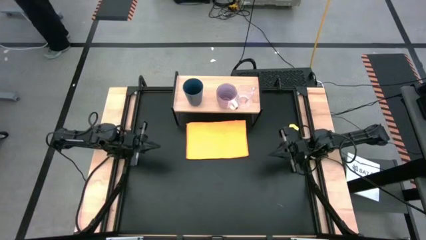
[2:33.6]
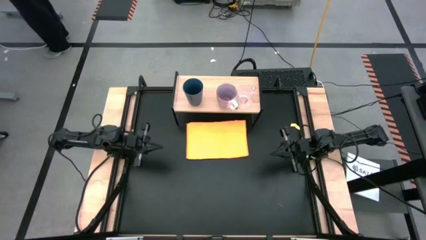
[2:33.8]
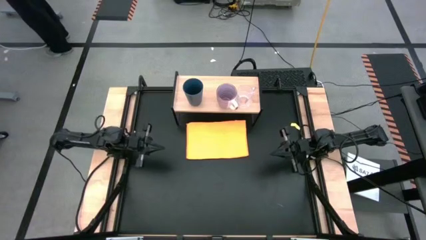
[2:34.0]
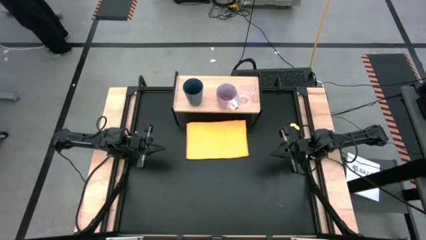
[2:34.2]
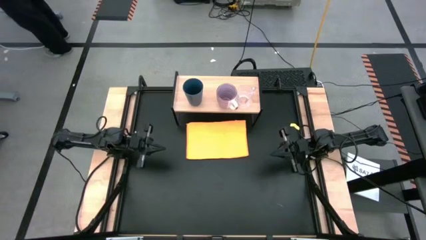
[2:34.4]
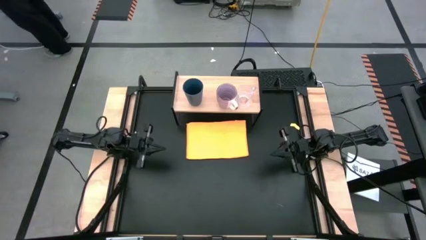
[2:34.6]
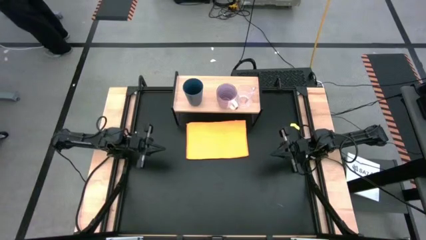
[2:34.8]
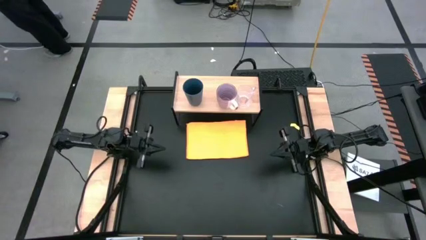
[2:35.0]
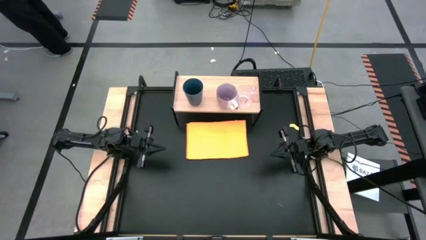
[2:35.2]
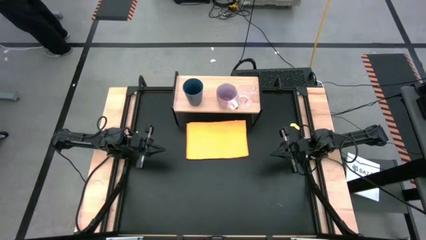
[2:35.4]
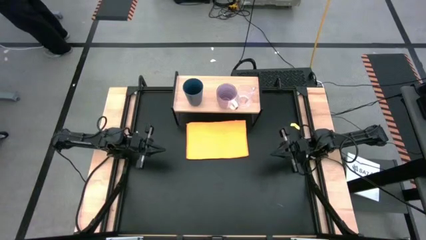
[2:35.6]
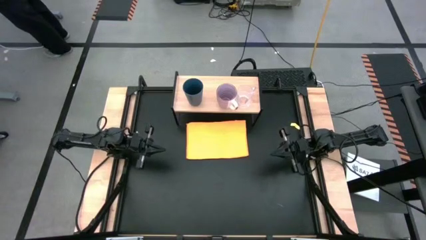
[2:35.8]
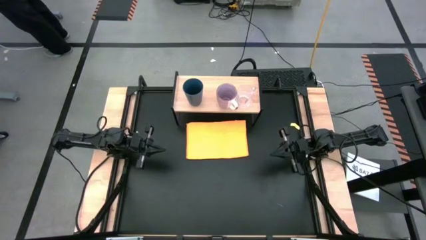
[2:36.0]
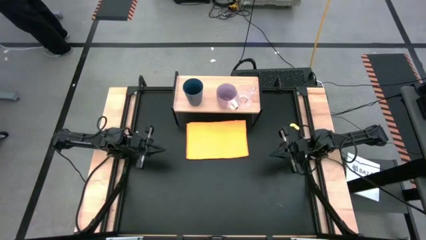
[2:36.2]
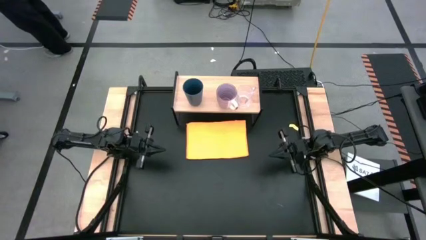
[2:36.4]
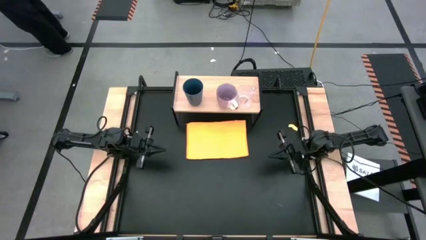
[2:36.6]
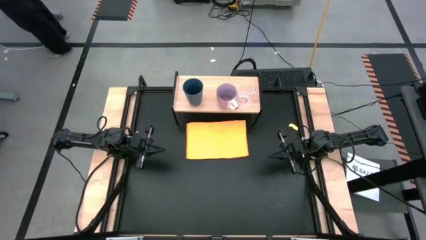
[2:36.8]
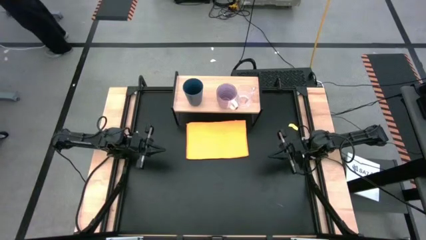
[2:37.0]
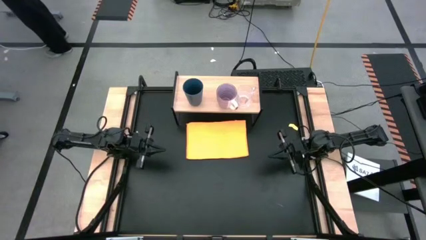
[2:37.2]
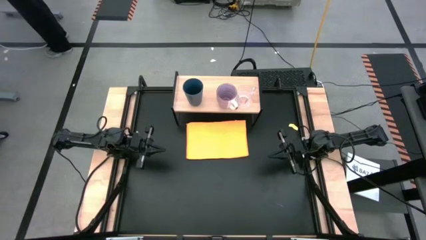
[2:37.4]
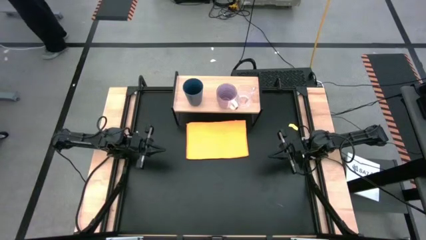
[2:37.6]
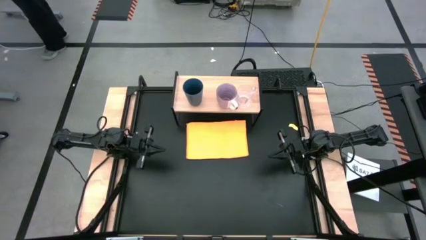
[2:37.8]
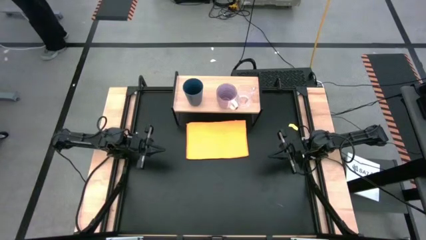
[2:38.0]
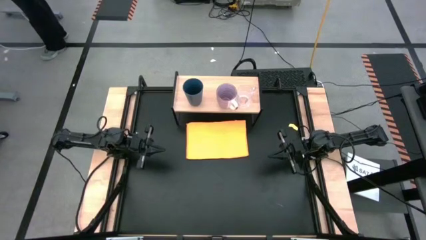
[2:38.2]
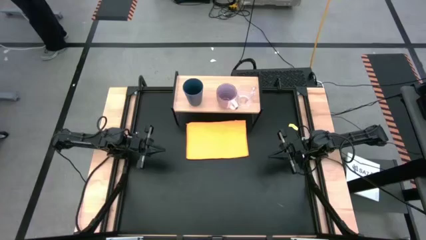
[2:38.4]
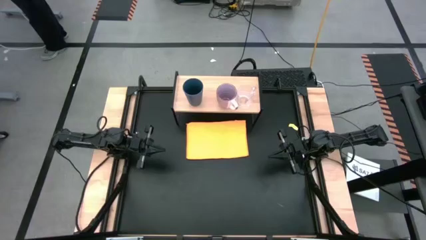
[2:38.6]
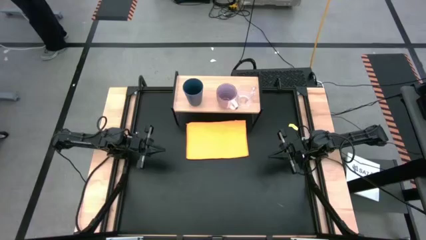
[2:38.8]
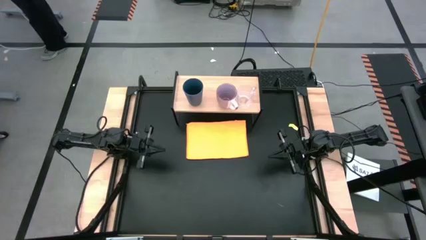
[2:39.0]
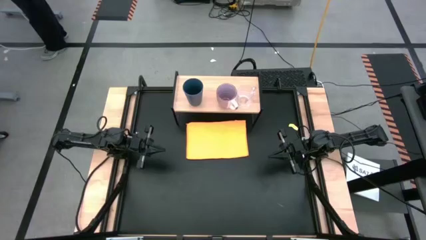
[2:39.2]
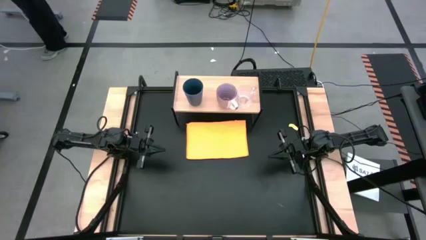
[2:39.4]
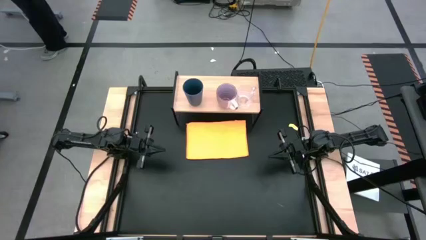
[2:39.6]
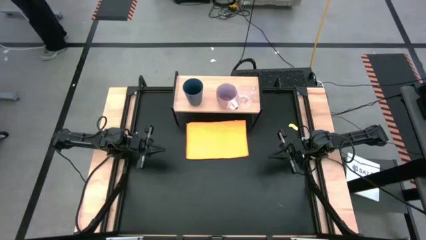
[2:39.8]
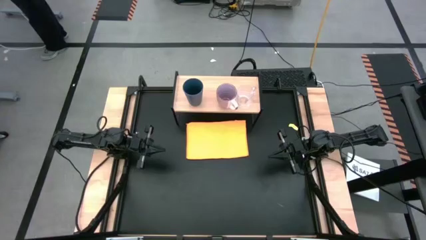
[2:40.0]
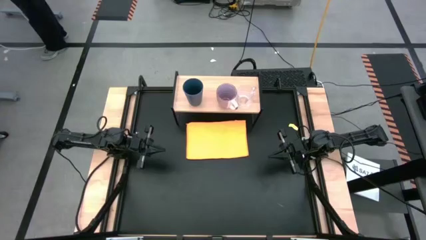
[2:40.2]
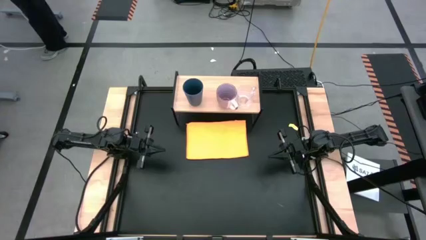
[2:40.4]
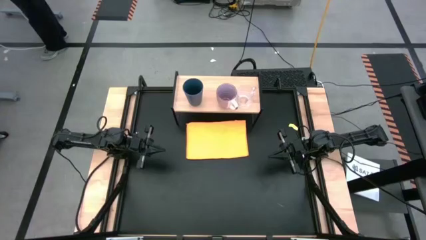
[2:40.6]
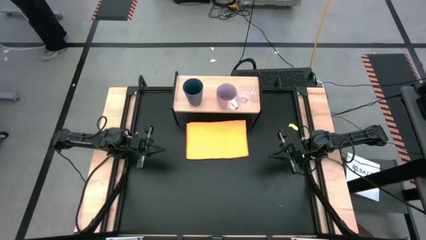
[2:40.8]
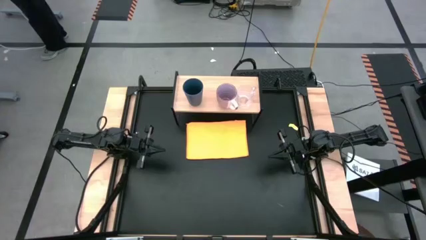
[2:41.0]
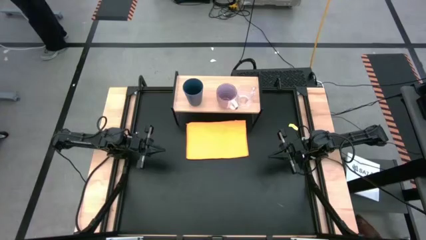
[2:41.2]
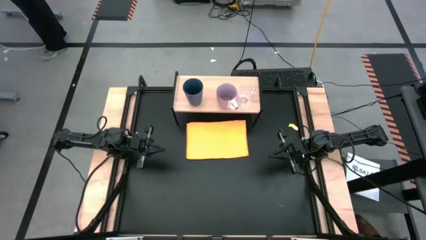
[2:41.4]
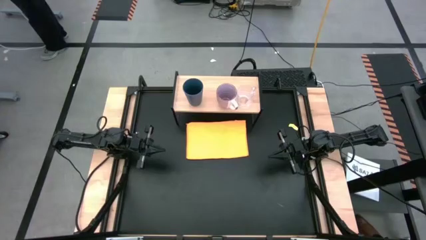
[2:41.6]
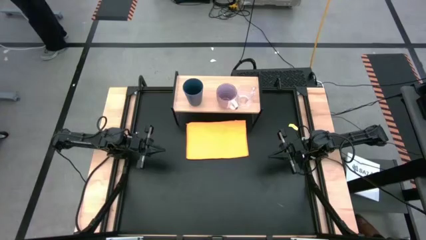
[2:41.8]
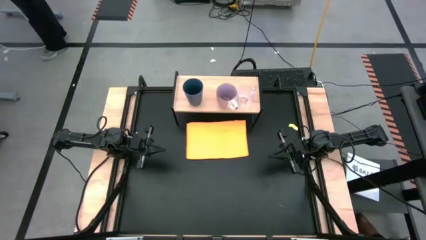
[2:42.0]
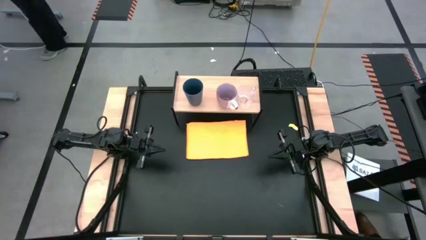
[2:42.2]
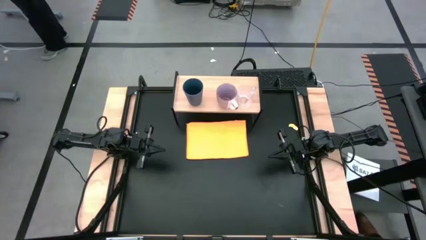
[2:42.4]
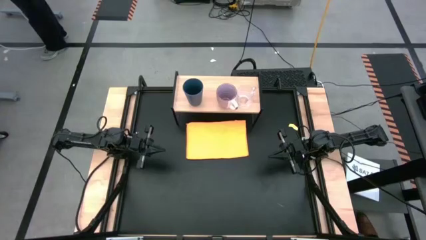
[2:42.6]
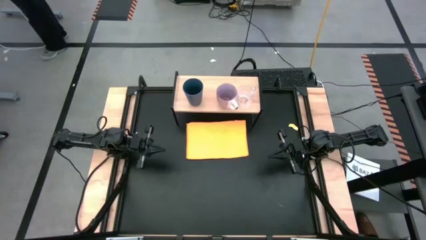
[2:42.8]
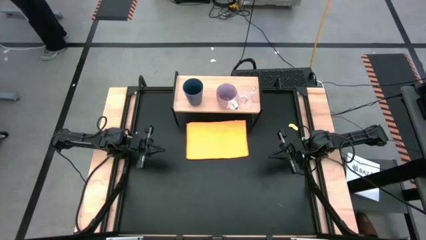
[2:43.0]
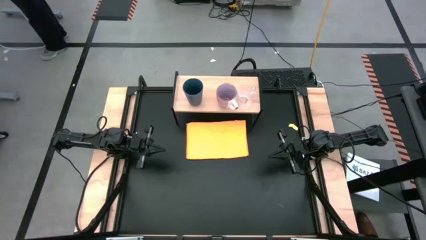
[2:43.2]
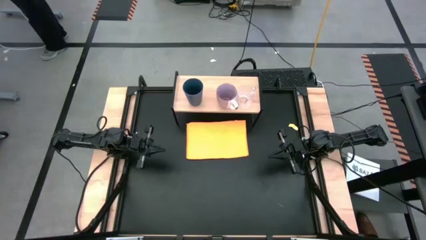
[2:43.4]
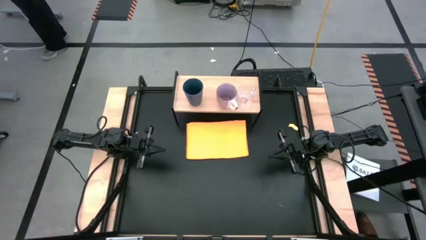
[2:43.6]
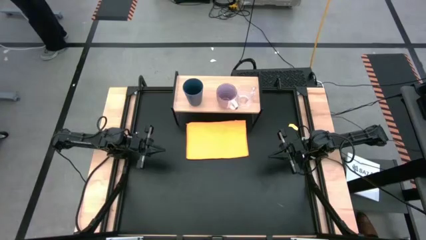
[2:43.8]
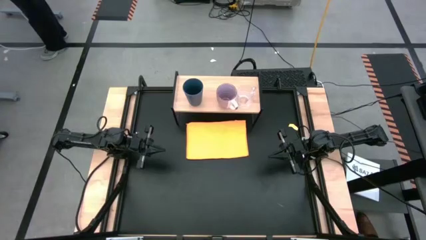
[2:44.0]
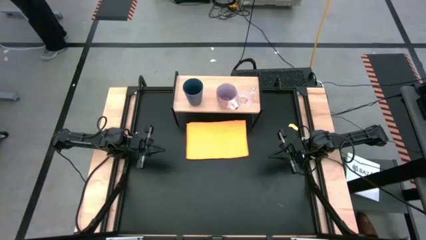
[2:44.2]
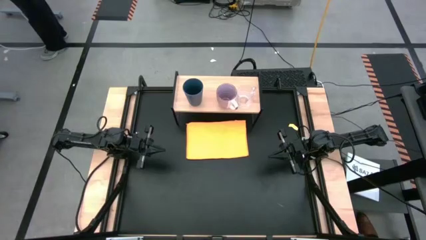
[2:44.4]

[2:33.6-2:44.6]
Task: Stack small to large cups/mugs on shelf
Return to Home Position

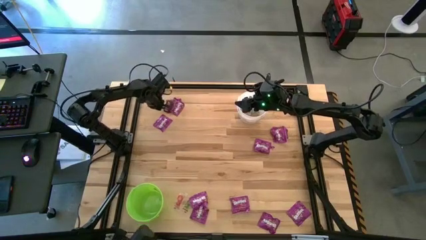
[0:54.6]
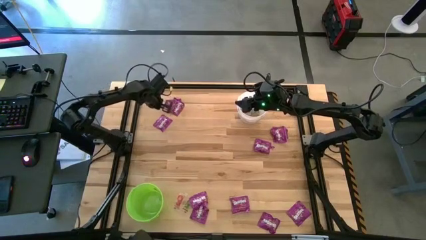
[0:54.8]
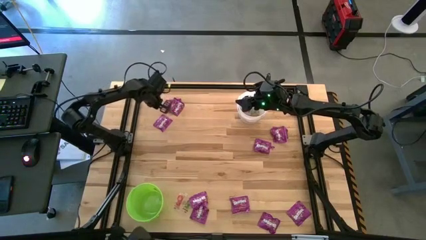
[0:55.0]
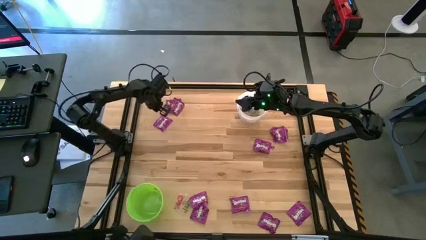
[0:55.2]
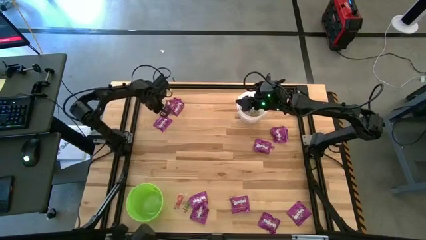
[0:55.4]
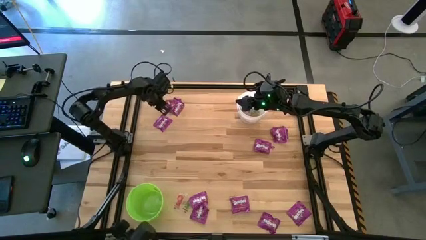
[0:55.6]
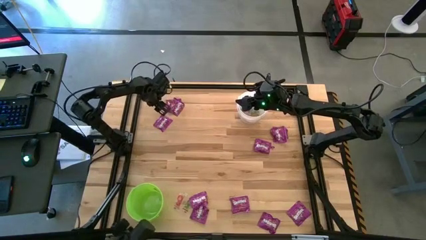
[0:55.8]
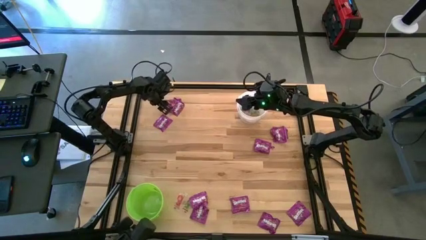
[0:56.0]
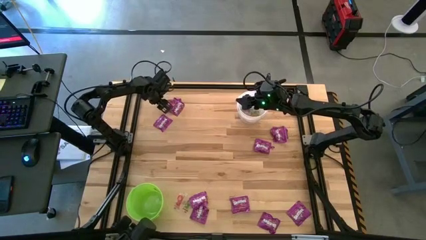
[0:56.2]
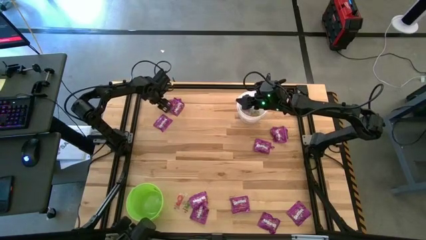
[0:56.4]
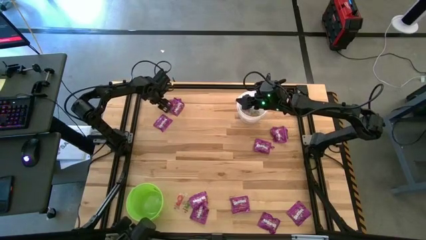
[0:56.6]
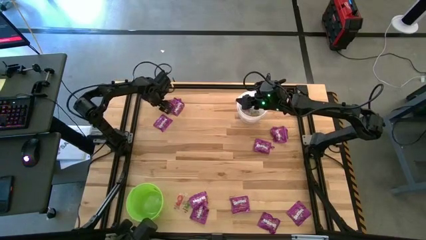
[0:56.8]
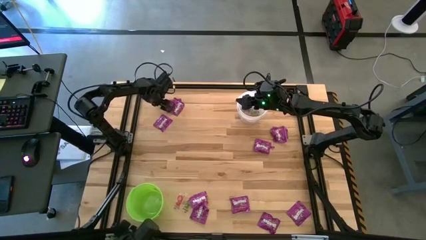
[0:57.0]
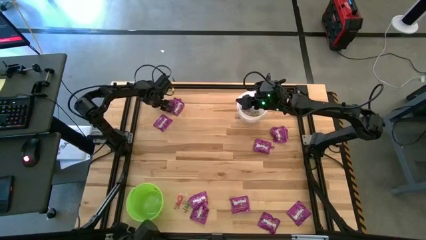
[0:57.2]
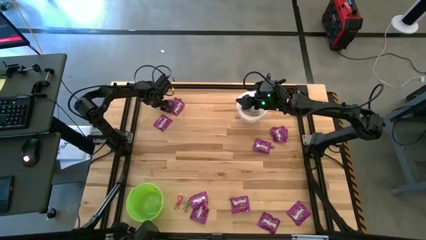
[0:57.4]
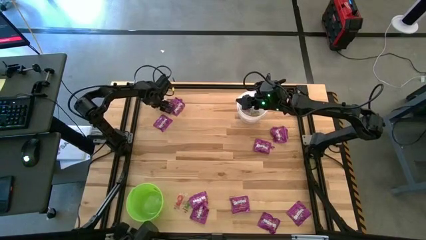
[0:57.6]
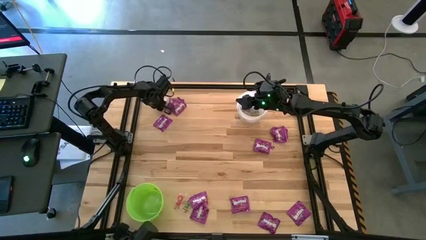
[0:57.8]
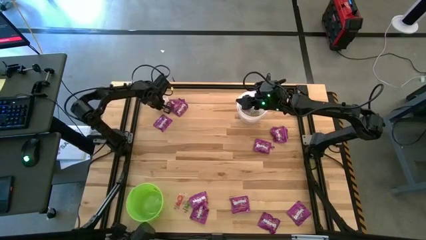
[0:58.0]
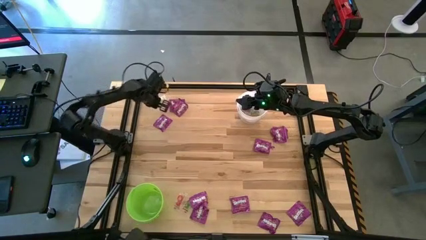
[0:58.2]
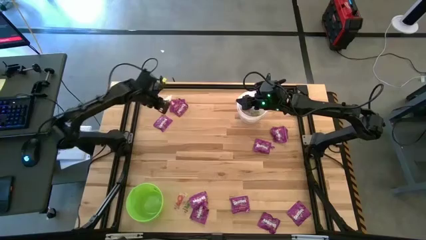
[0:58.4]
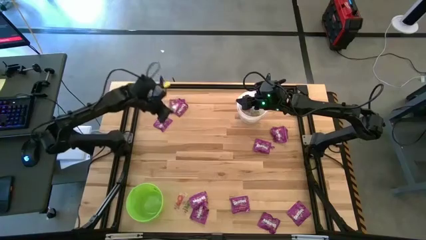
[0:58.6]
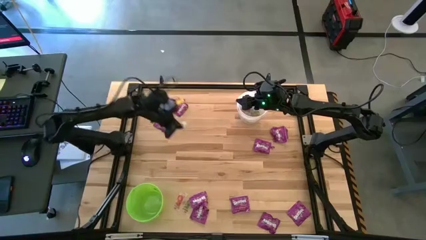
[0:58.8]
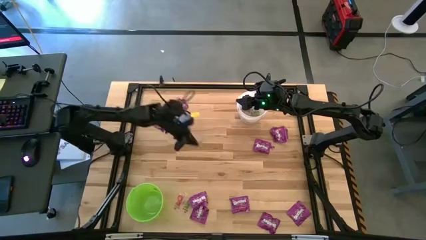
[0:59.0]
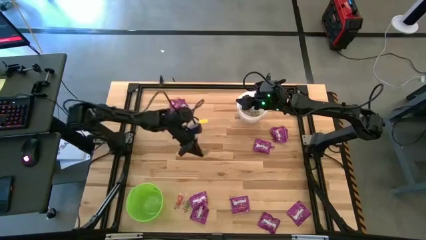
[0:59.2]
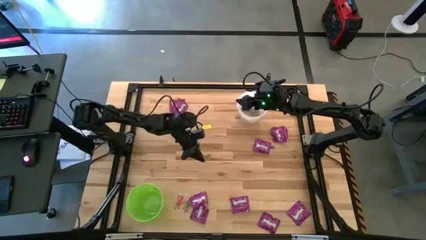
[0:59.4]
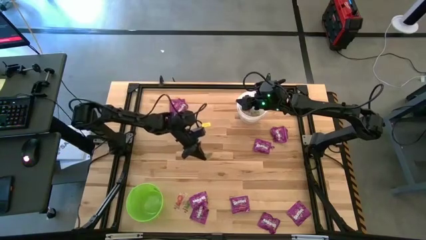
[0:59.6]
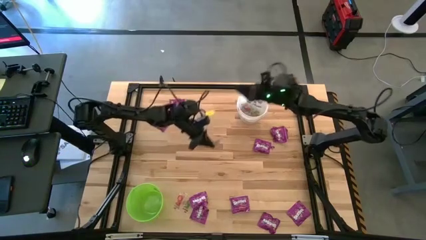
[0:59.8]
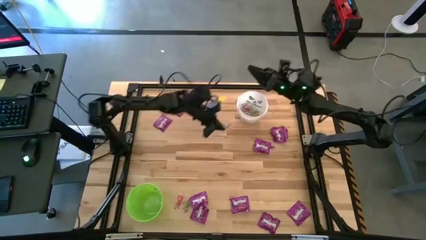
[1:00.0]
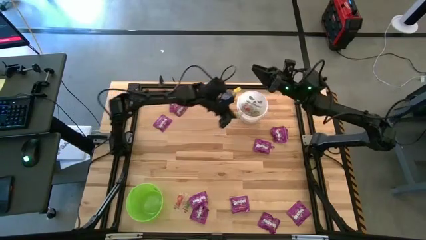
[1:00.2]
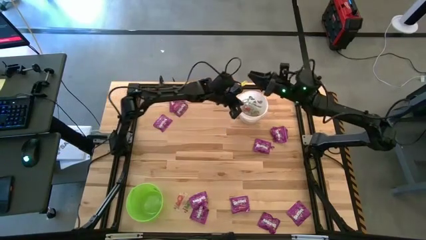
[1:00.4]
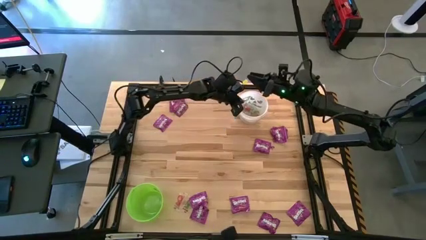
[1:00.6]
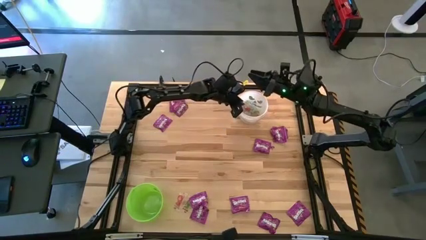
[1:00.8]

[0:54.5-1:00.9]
Task: Sort candy by brand, put in halloween buckets
Put the green gummy into the white bucket
